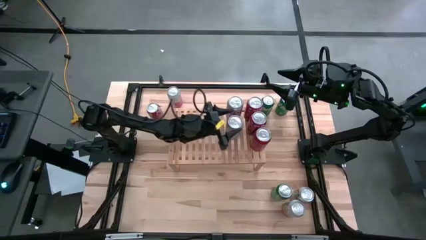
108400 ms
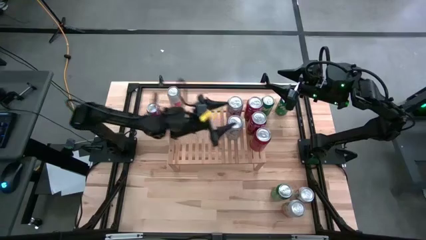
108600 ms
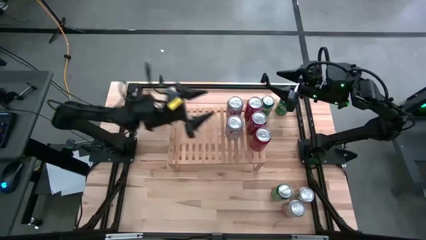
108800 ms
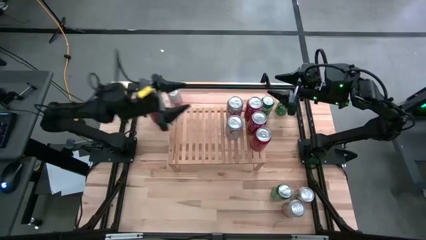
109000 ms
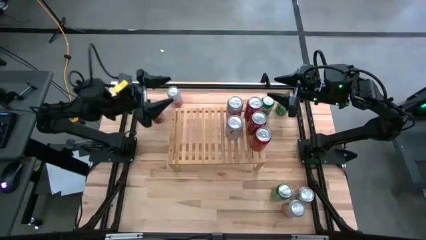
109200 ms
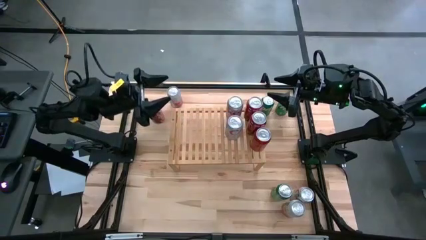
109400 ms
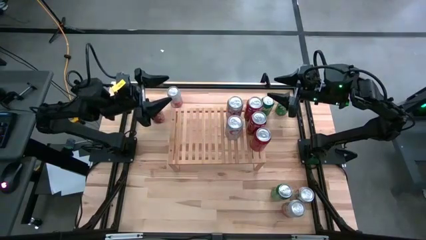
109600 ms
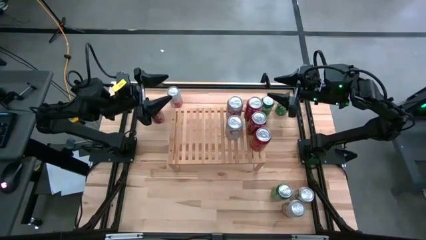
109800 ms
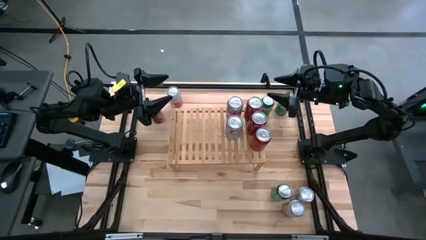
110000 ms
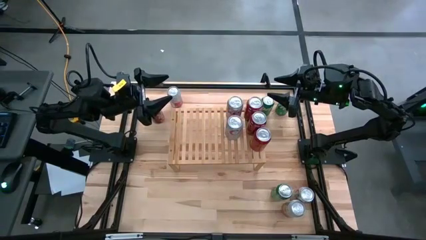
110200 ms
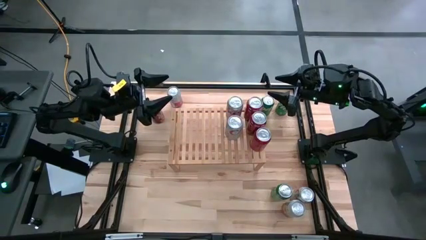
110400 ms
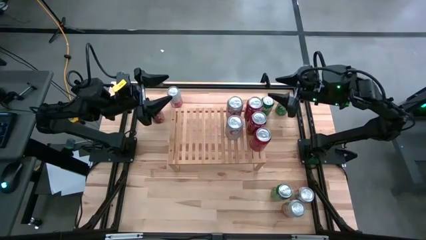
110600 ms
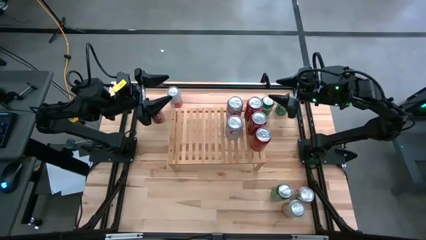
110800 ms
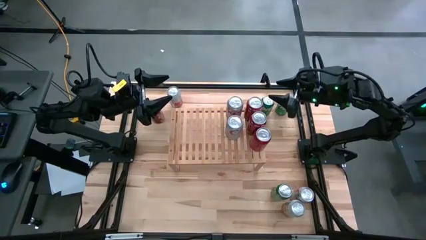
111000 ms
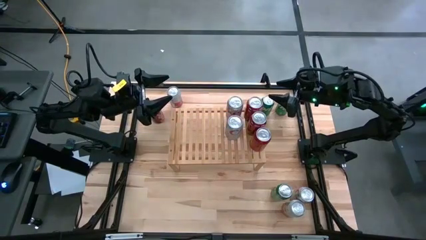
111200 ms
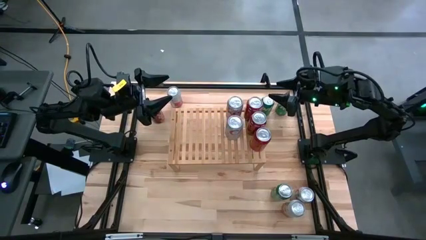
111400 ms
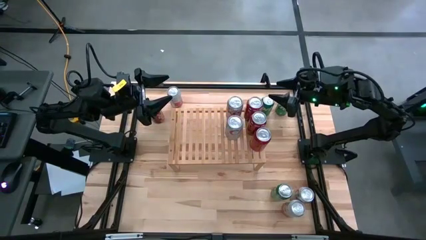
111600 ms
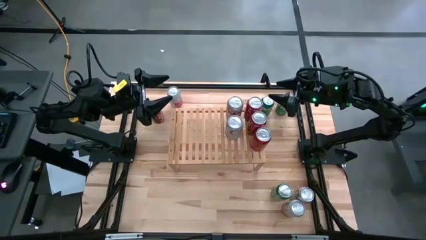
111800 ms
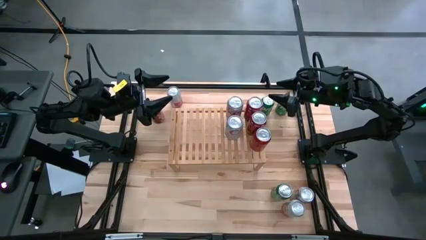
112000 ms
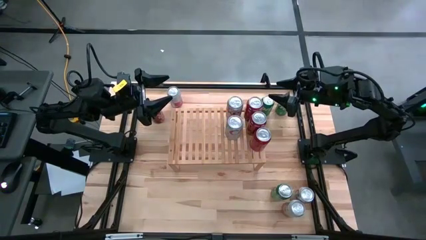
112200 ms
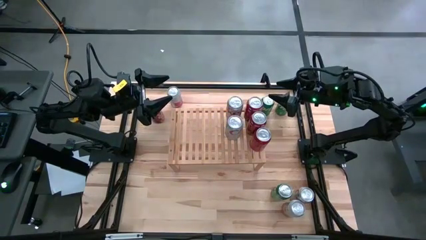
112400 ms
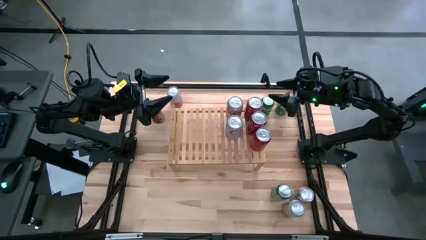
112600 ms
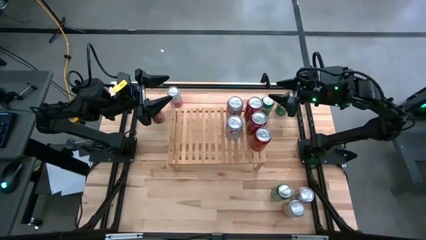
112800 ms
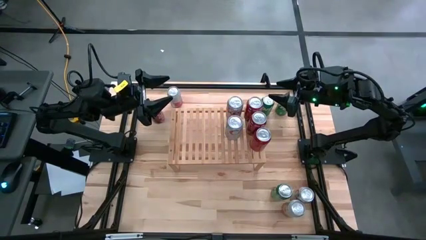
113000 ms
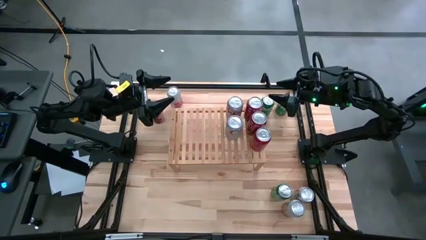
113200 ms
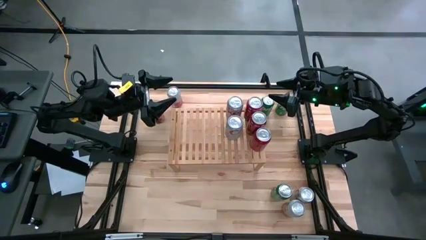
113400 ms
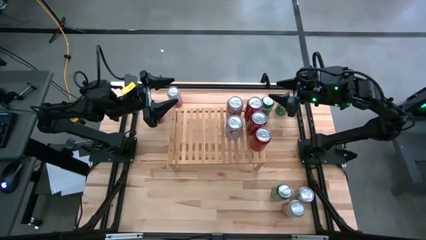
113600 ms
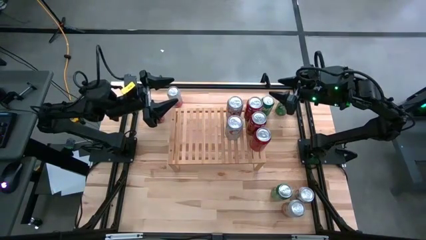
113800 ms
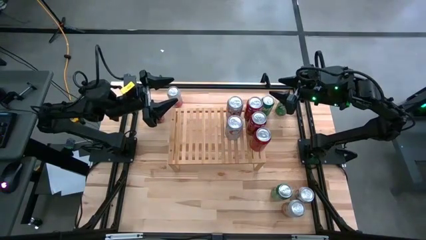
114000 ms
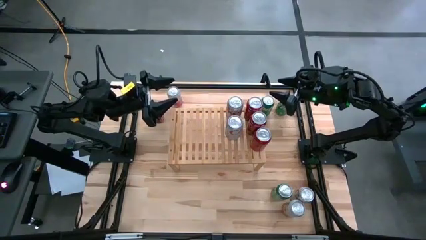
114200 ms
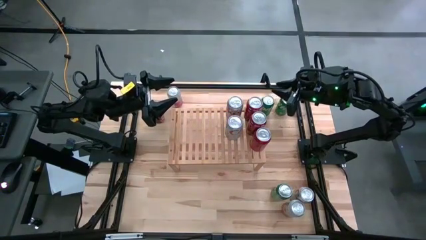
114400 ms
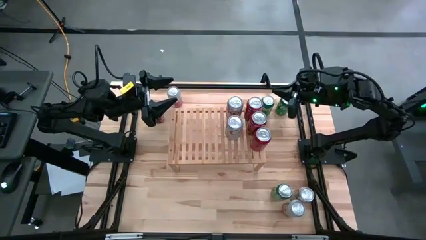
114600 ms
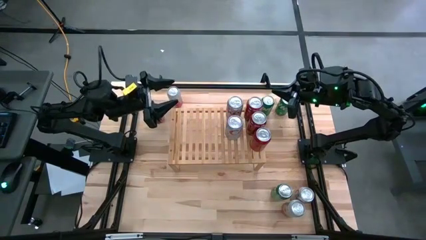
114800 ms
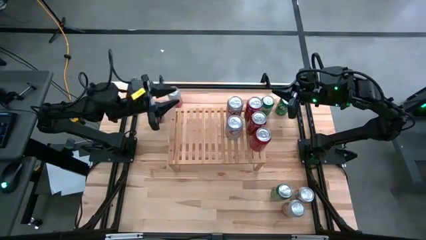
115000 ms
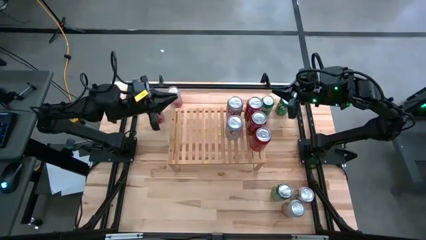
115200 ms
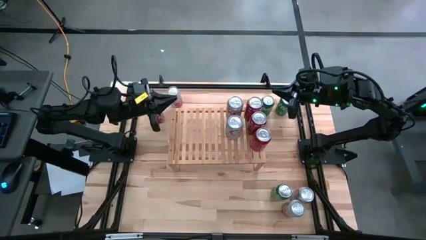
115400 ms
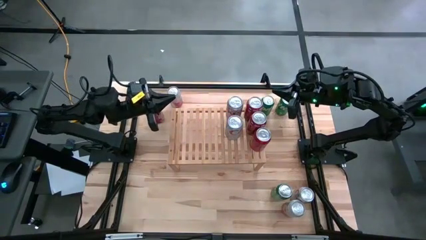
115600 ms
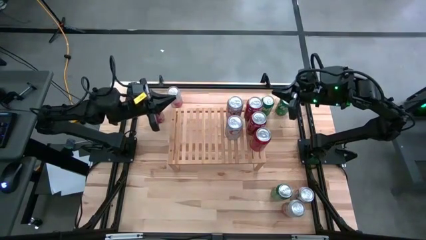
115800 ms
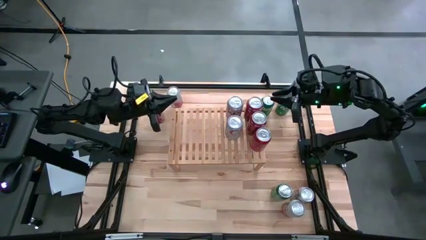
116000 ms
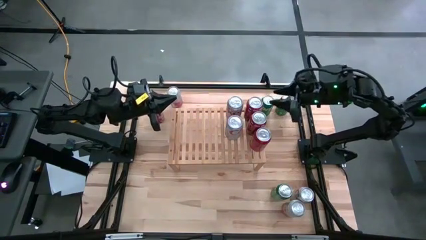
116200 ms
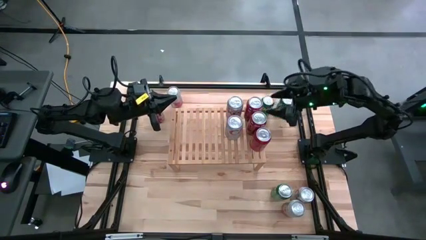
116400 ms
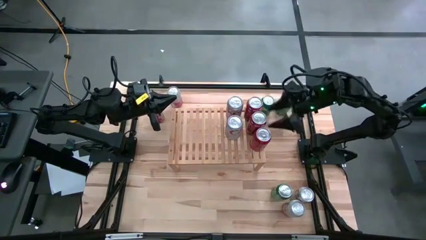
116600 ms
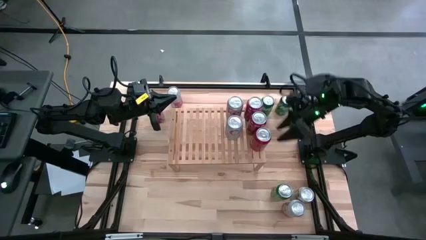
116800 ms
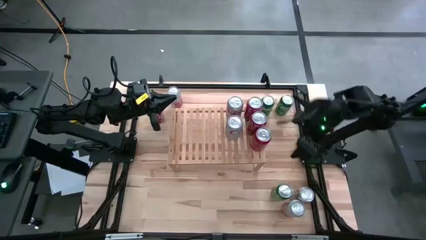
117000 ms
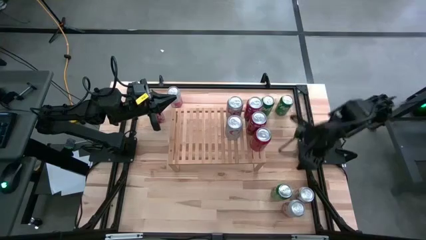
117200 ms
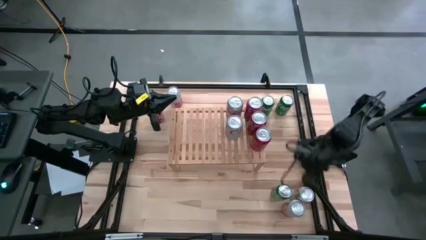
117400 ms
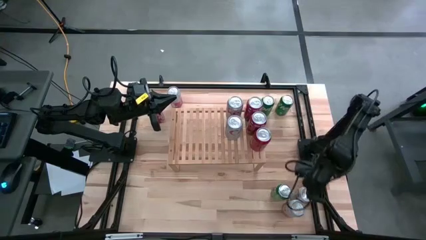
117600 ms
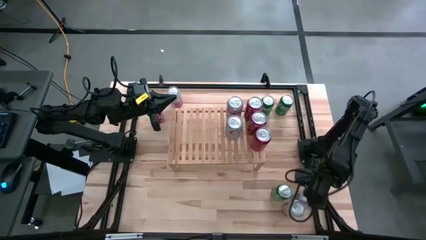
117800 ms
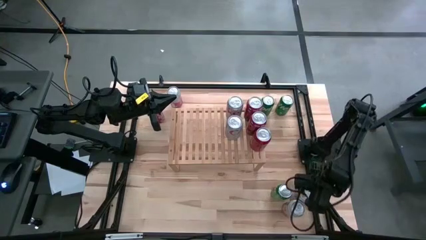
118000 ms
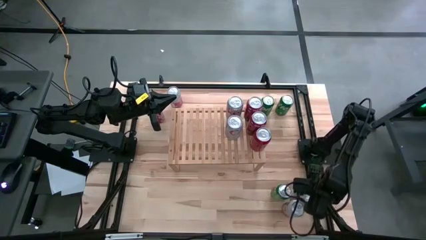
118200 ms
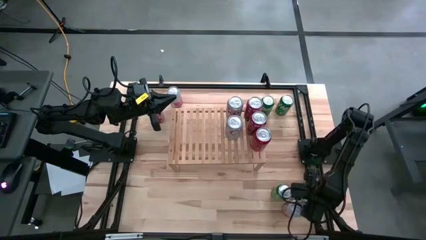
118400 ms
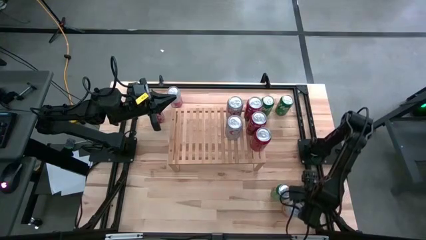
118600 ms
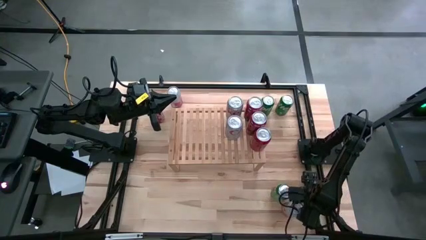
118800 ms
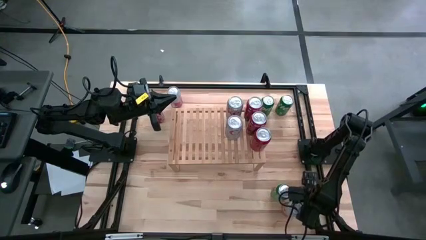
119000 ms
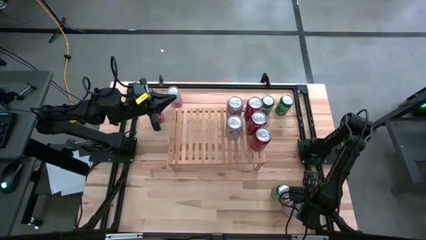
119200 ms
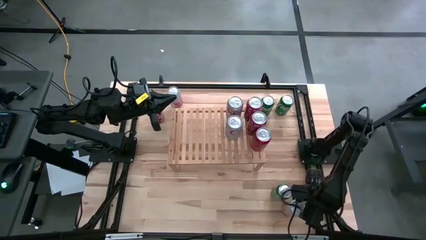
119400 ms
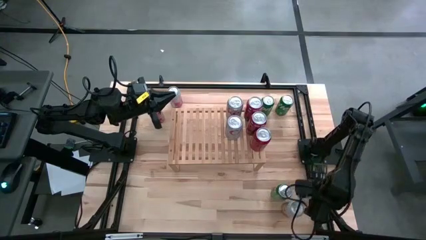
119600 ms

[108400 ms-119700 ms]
Task: Place canned beverage on shelf
Put the bottom right silver soda can on the shelf

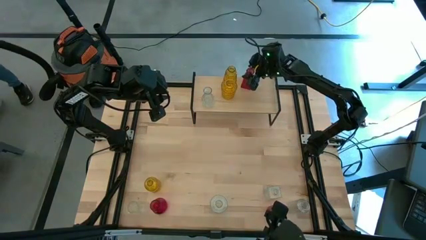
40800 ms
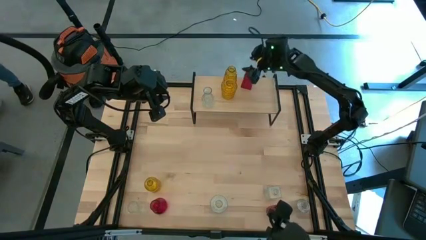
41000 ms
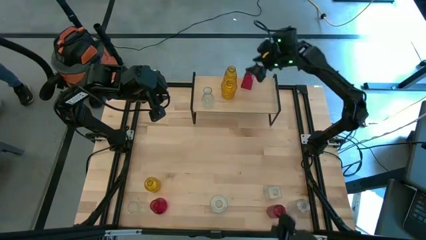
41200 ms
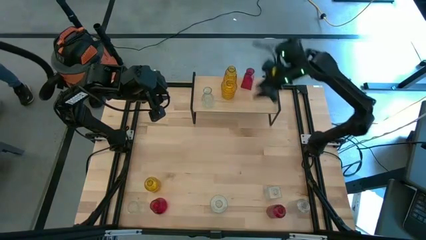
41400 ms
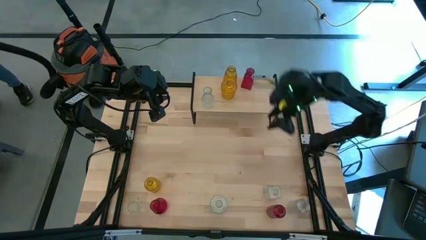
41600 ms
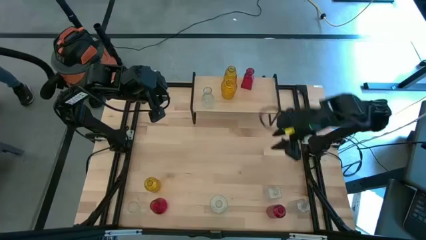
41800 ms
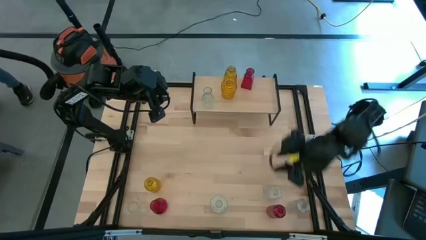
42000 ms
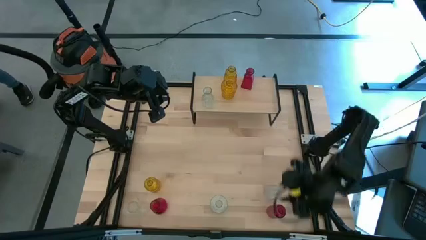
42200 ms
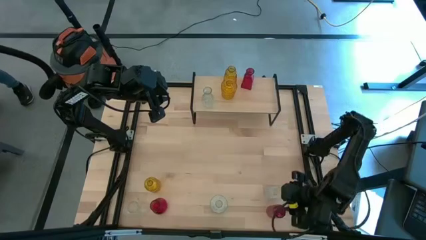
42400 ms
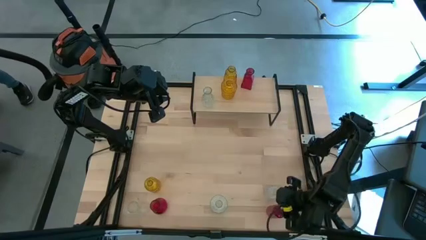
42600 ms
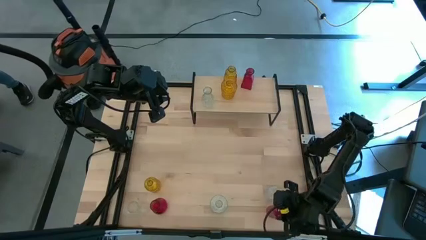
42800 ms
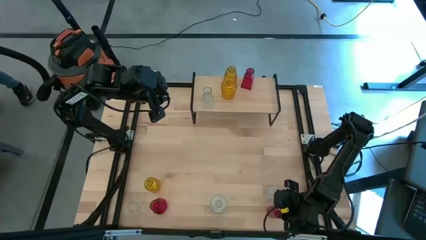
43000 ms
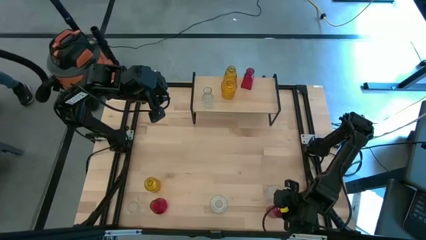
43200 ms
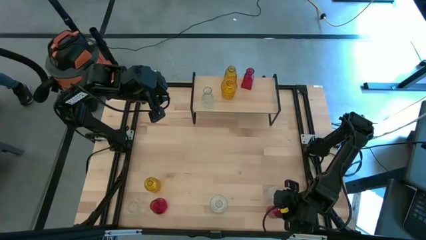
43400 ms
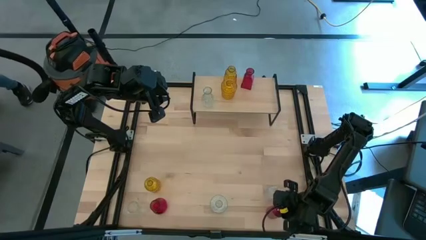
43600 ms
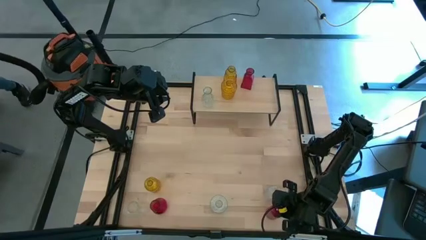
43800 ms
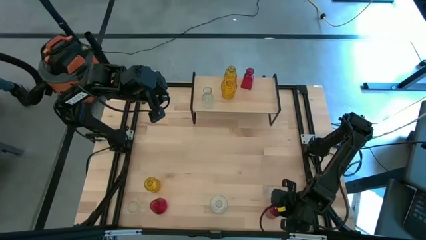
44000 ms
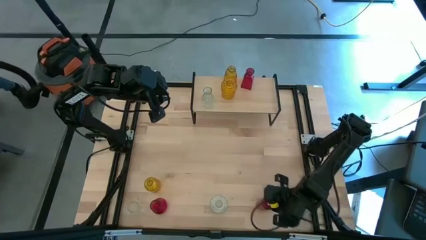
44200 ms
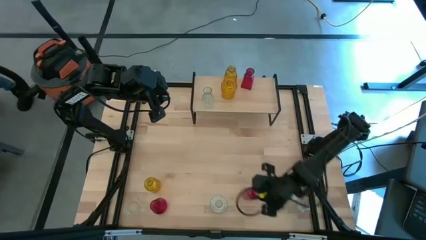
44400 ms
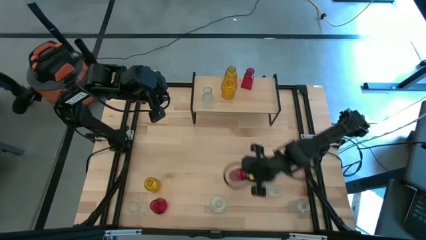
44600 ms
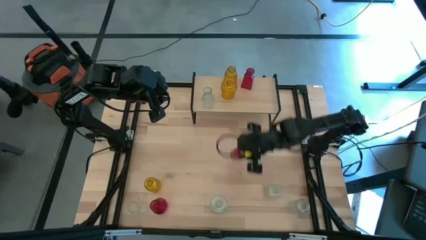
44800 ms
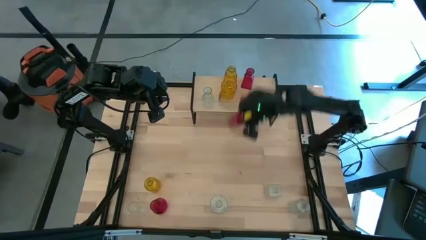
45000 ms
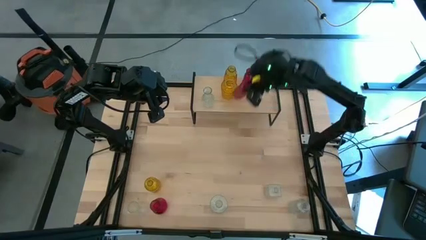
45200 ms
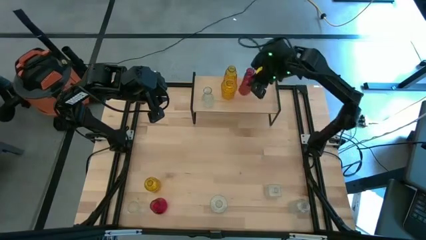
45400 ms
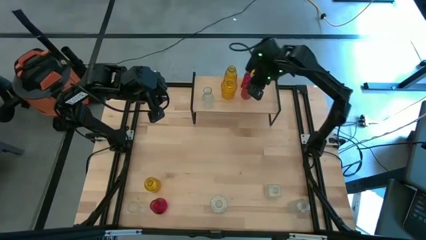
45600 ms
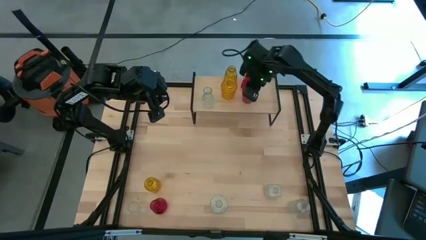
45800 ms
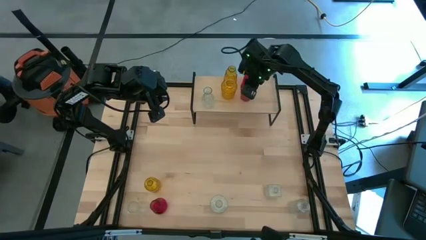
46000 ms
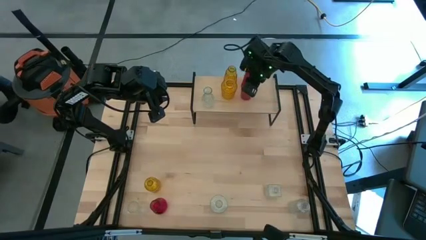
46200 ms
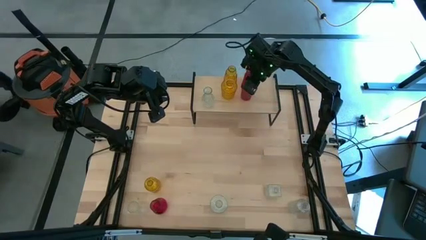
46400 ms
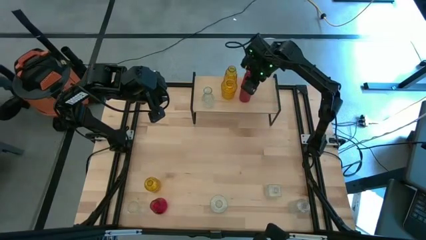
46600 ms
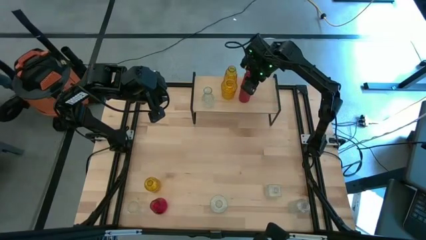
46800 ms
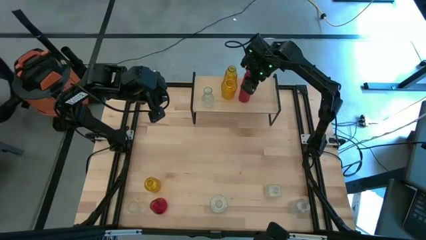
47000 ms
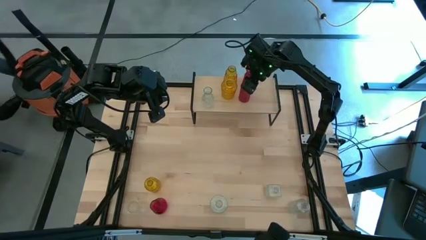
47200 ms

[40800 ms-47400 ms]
Task: sort vases onto shelf
Put the red vase on the shelf aligned with the other red vase
